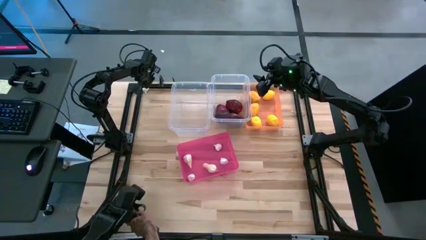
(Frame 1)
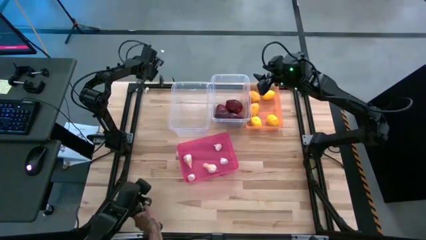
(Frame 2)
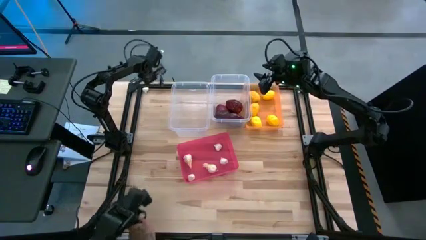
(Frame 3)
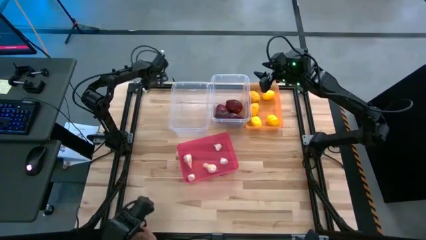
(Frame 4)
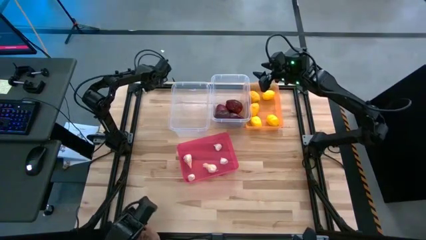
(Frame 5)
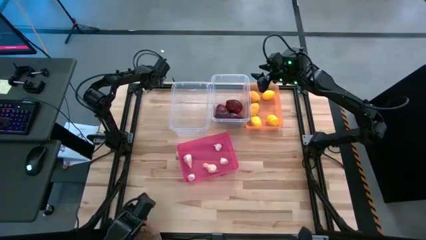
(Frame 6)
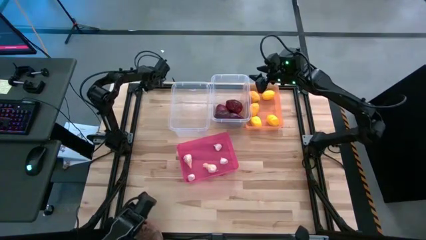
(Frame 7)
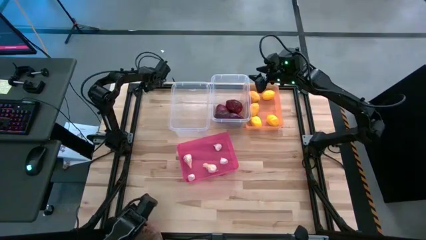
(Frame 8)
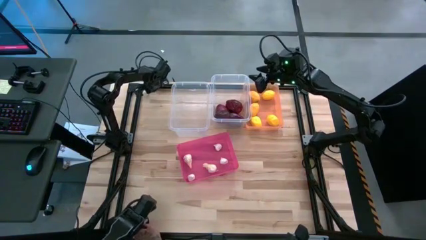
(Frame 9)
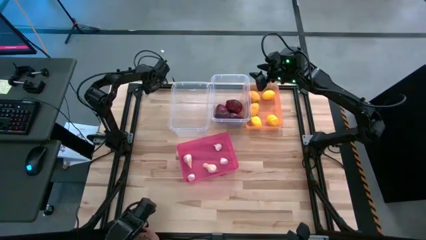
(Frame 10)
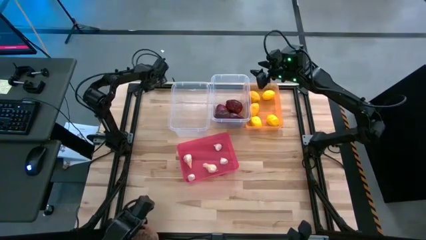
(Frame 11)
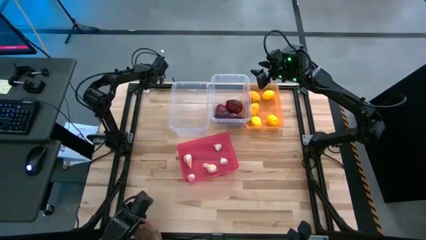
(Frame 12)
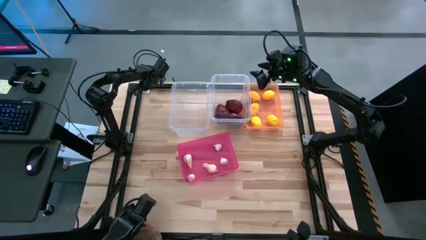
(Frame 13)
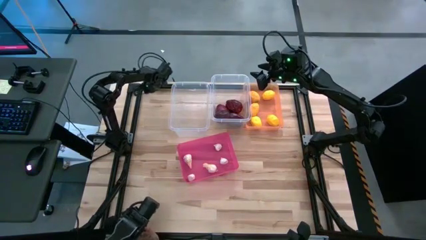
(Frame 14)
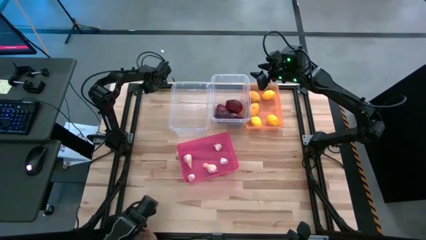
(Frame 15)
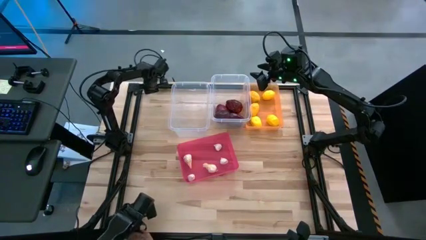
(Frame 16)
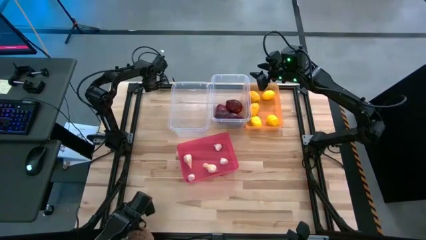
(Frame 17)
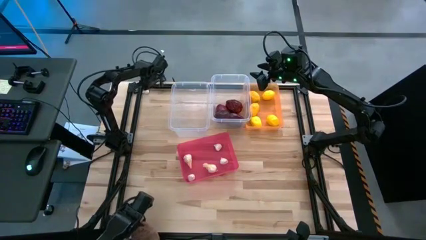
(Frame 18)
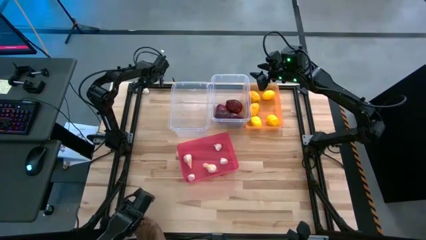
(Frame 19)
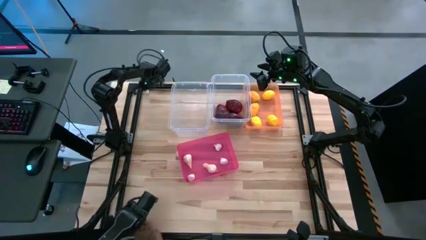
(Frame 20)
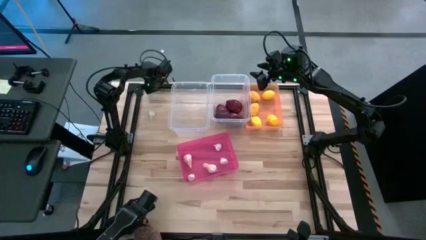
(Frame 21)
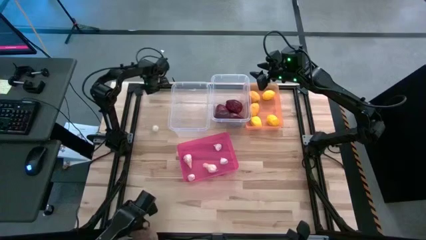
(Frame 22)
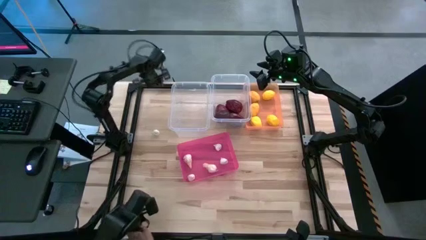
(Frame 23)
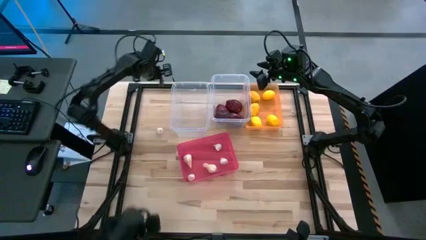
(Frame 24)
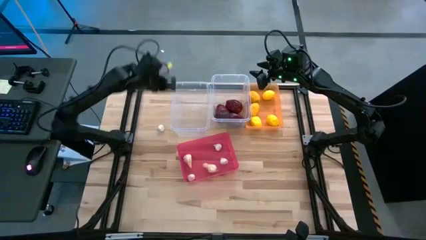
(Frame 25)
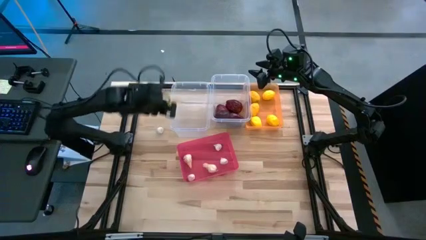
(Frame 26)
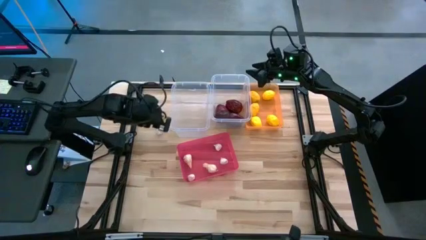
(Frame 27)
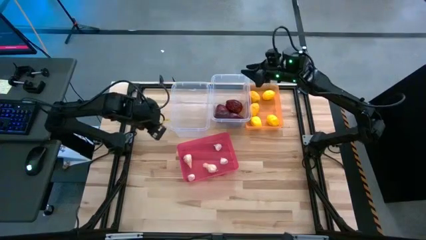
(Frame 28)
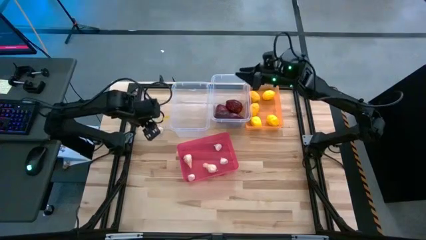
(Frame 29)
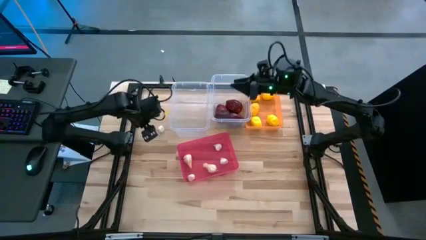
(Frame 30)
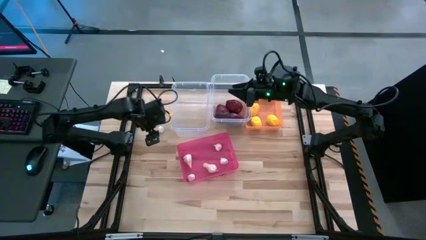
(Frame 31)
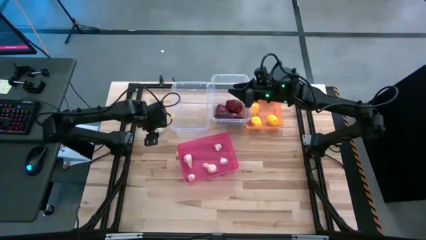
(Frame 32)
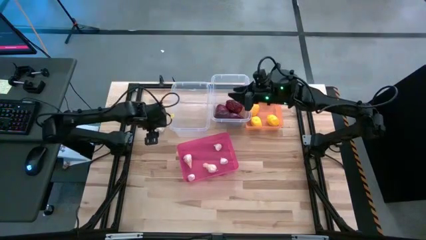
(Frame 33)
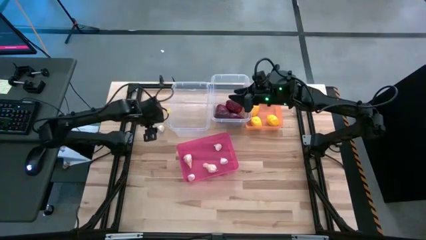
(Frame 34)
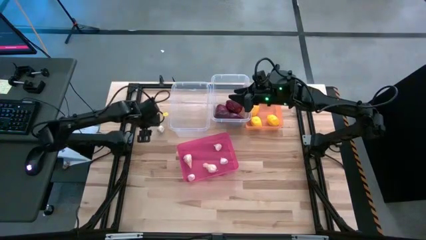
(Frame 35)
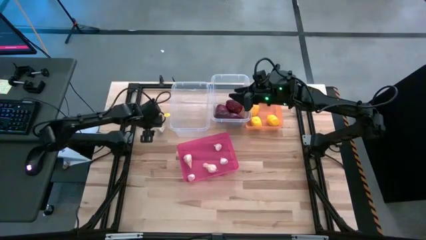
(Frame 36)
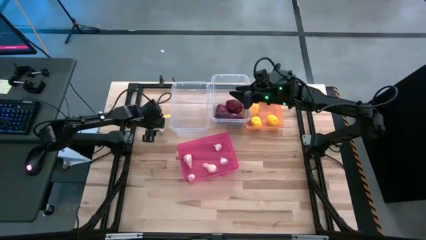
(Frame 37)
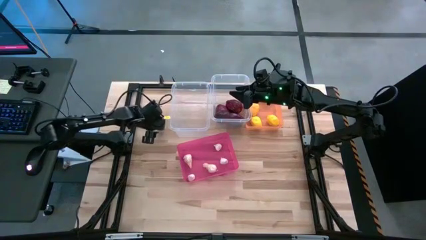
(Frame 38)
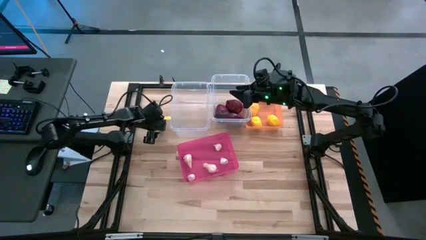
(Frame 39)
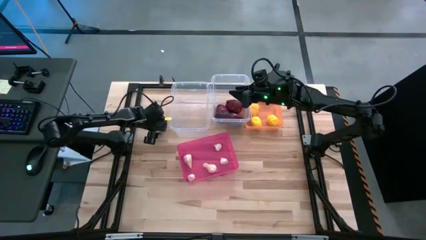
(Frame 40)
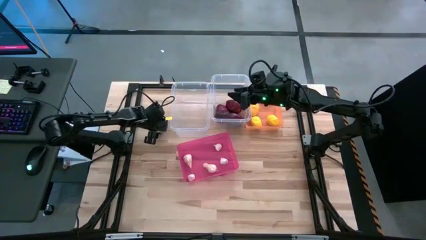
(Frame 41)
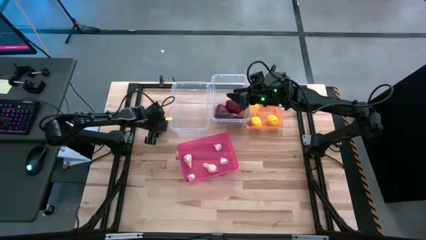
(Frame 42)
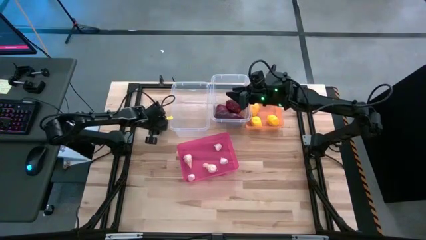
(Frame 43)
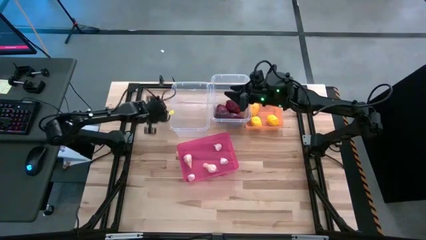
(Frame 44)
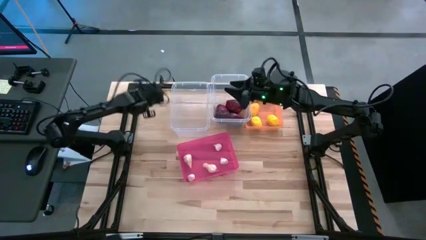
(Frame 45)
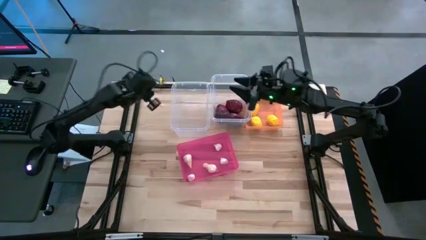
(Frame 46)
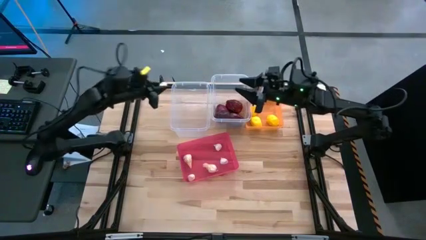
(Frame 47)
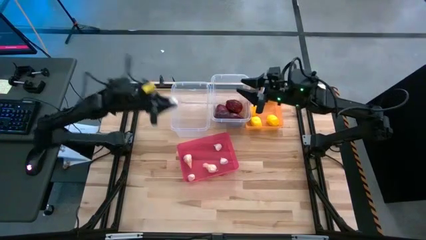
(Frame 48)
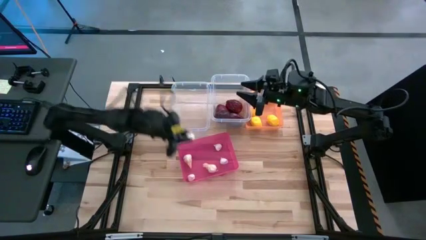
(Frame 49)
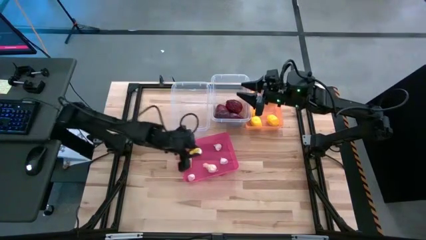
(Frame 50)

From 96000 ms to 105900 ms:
Task: Sort produce into baskets
Put the white garlic into the pink bin
